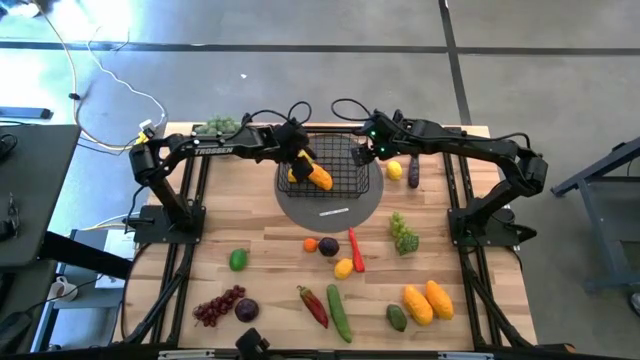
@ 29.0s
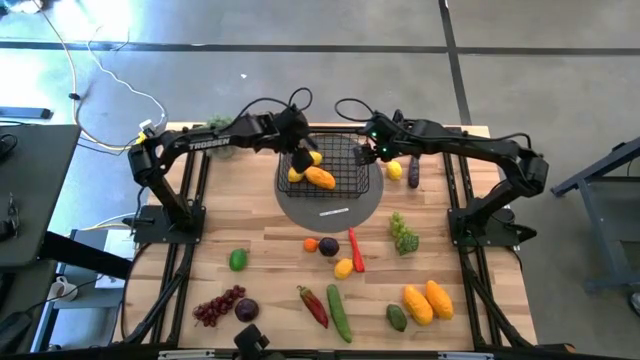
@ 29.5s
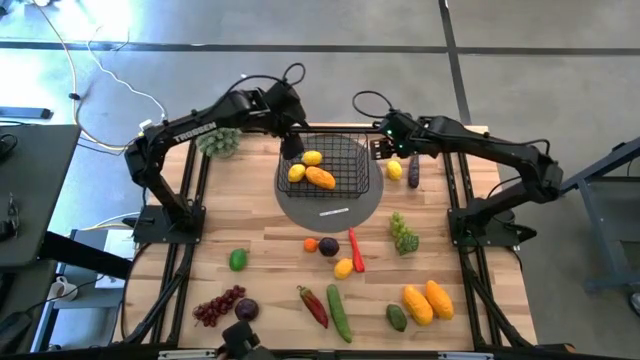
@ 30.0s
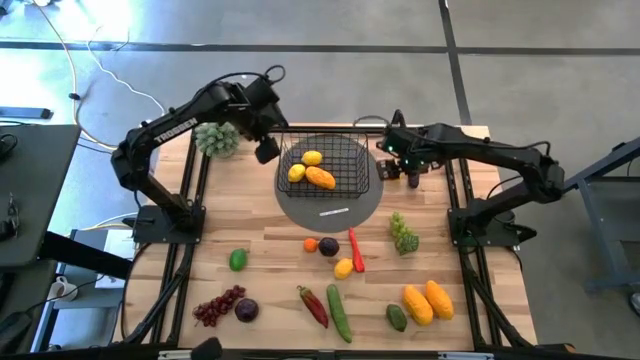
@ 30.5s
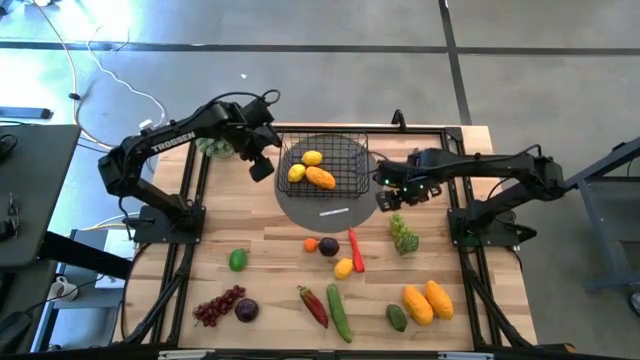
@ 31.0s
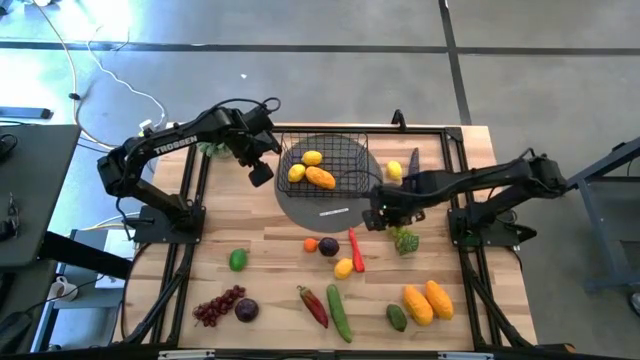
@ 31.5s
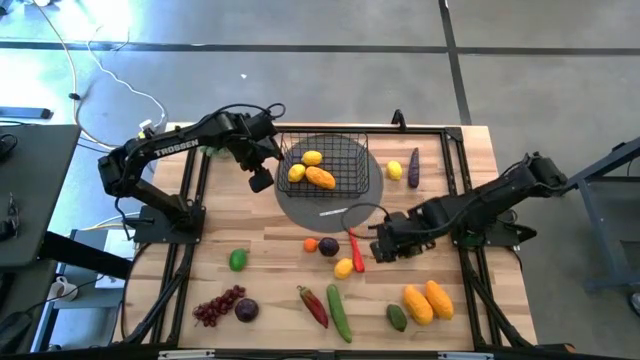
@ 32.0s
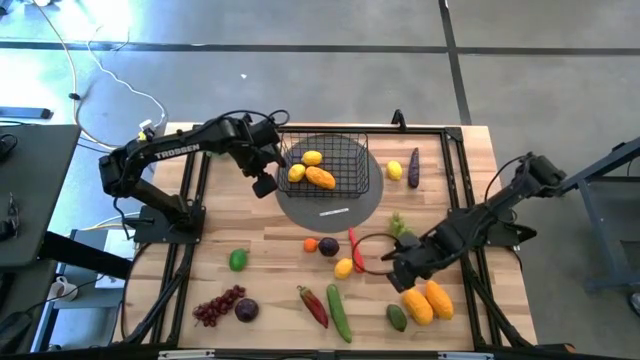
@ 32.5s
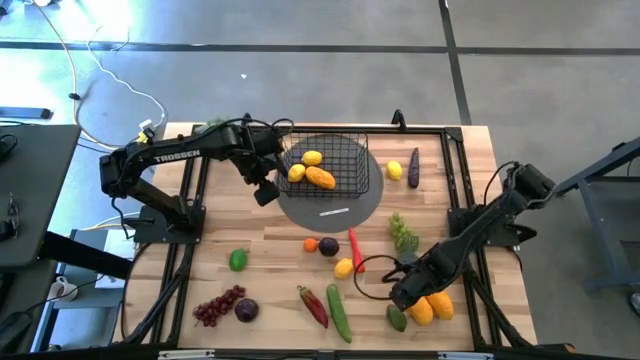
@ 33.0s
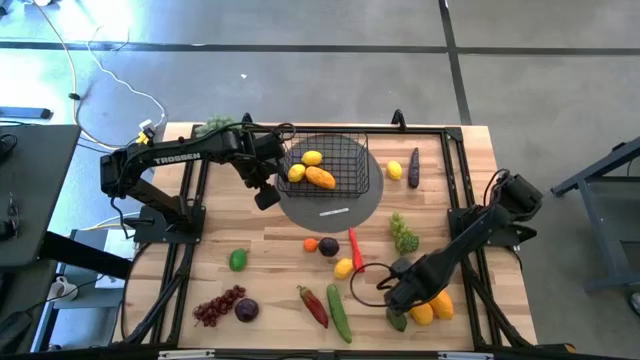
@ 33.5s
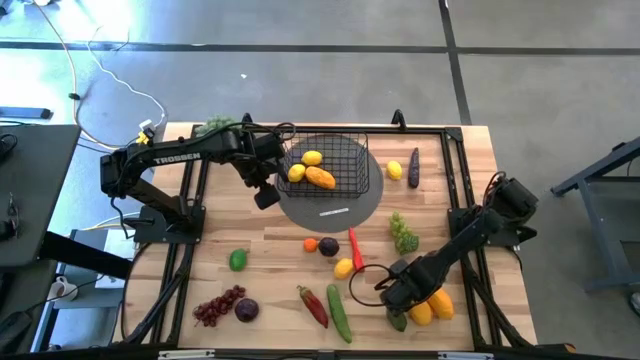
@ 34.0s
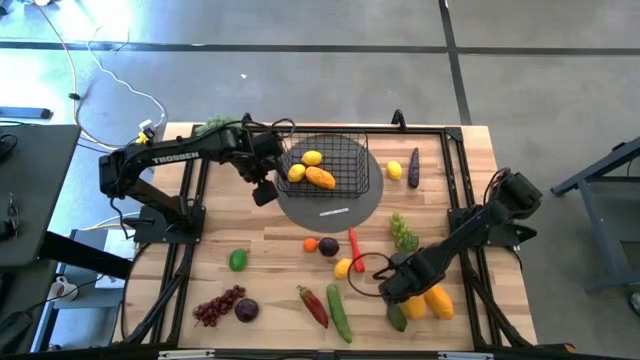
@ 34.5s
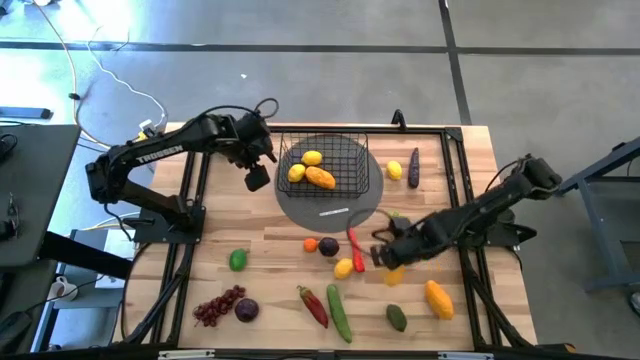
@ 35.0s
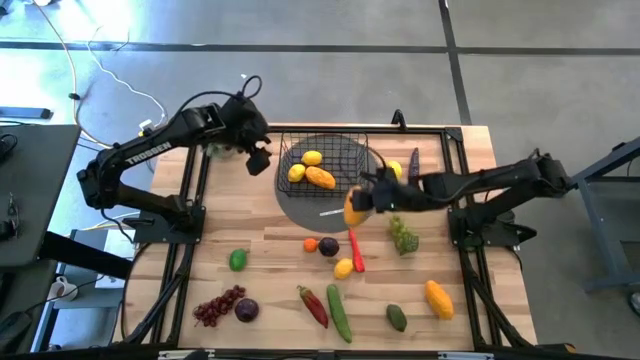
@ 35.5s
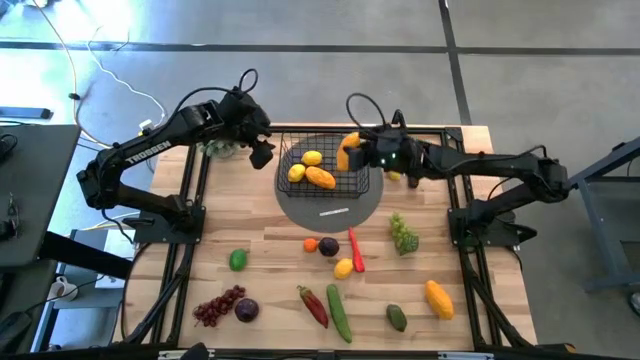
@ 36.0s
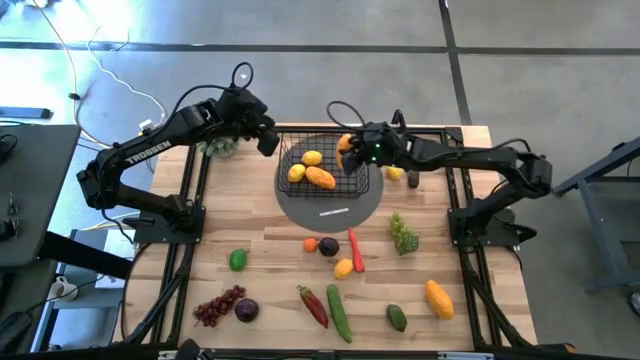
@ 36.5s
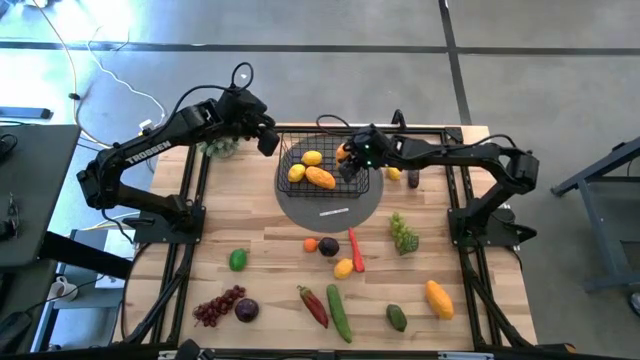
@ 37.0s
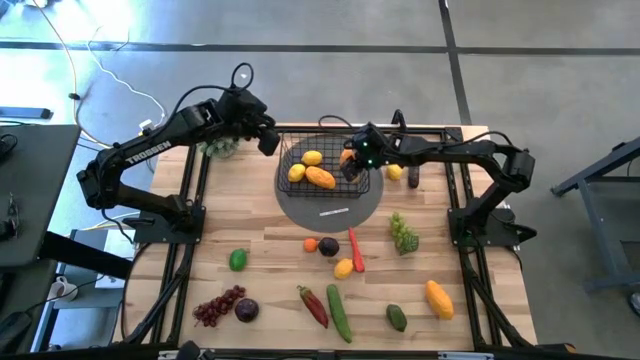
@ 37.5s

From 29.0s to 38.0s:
Task: Build produce basket
Put the mango into the black wire basket

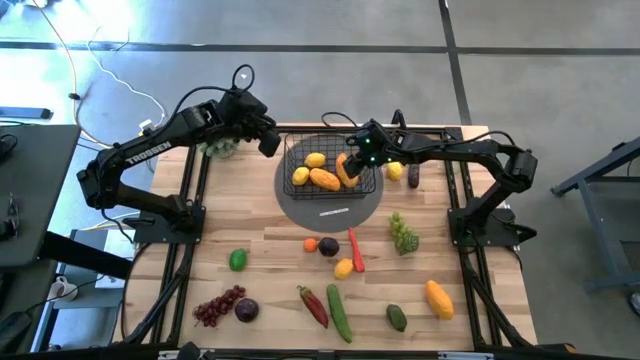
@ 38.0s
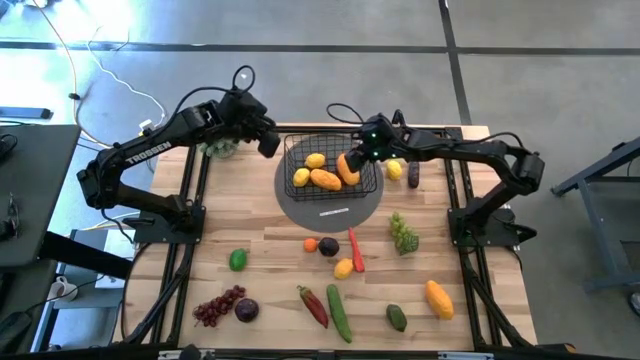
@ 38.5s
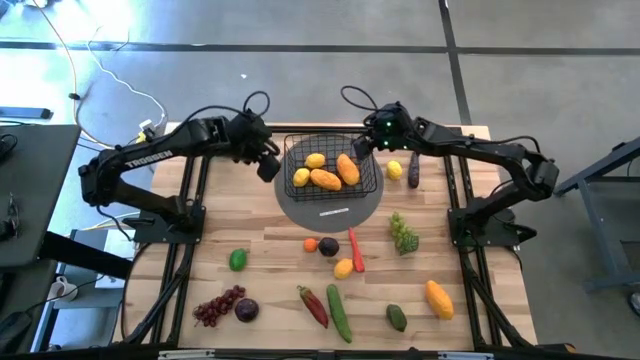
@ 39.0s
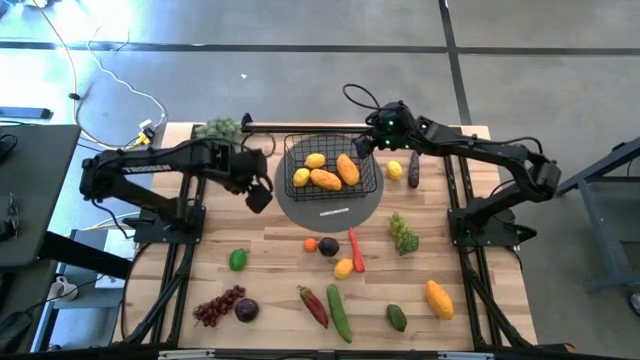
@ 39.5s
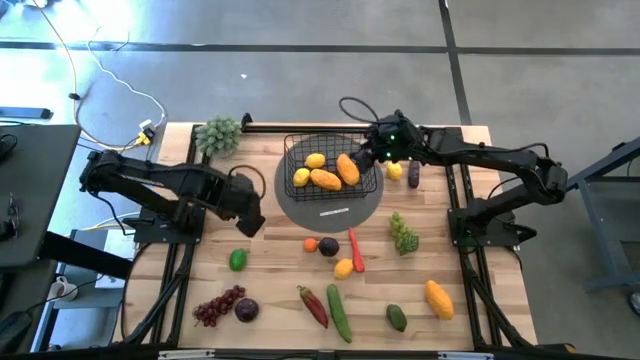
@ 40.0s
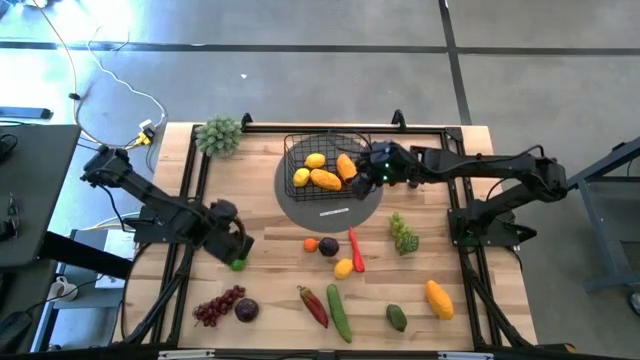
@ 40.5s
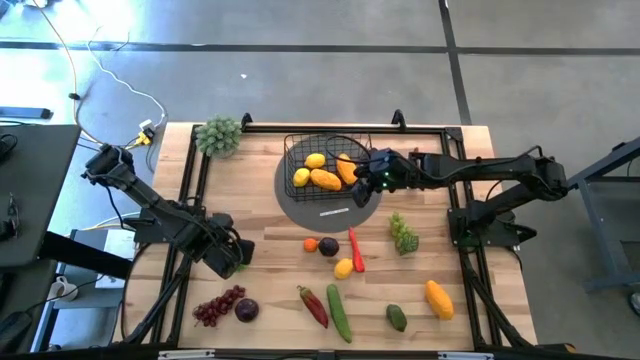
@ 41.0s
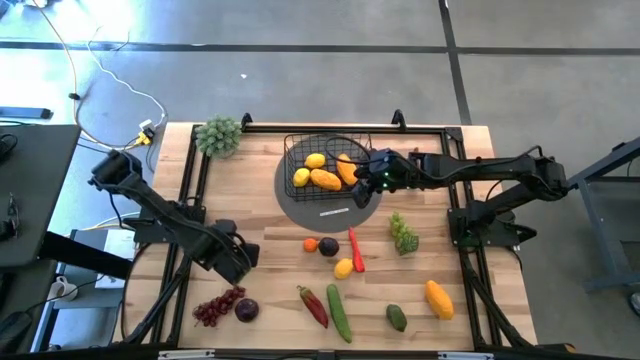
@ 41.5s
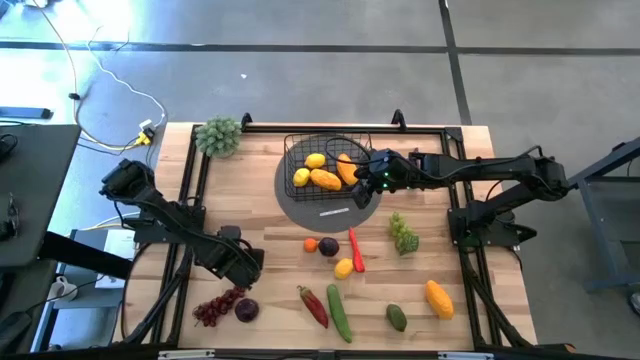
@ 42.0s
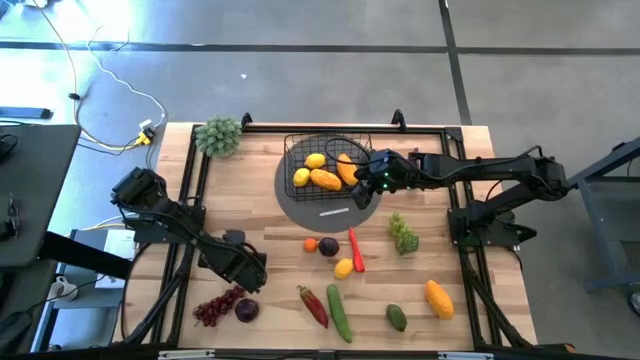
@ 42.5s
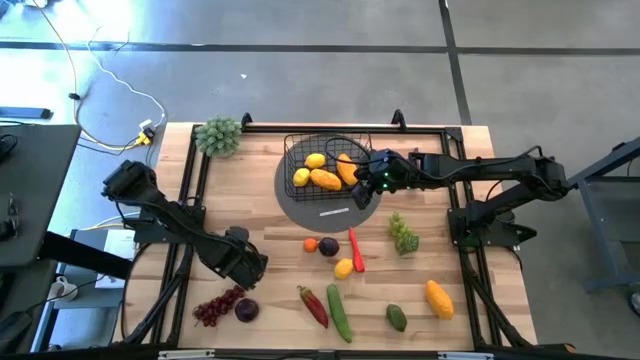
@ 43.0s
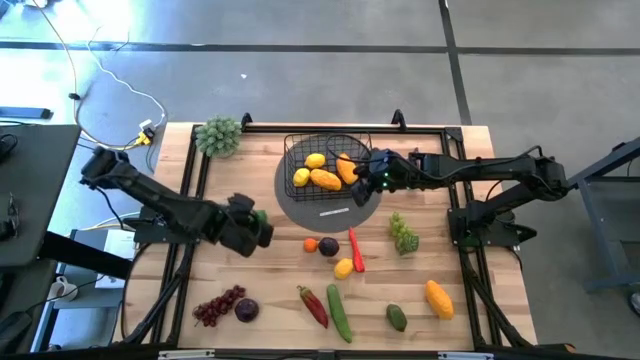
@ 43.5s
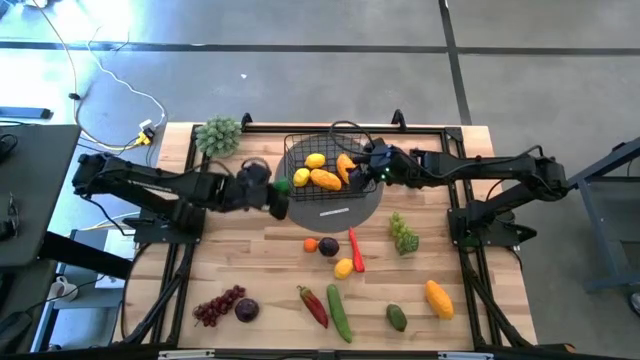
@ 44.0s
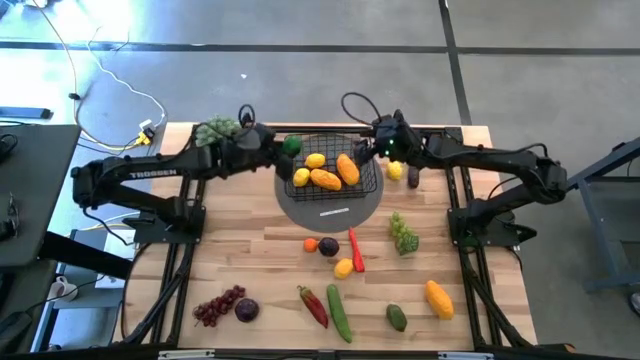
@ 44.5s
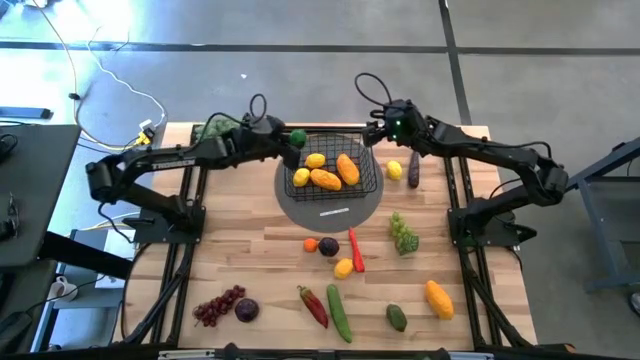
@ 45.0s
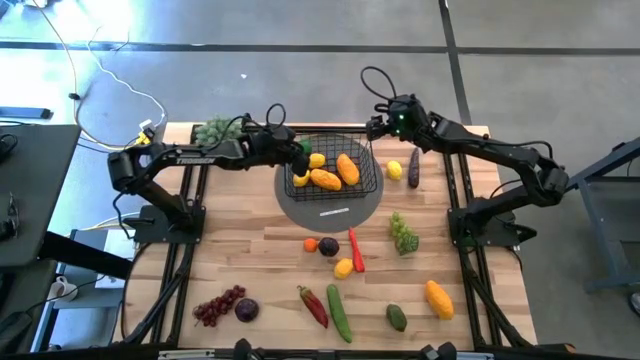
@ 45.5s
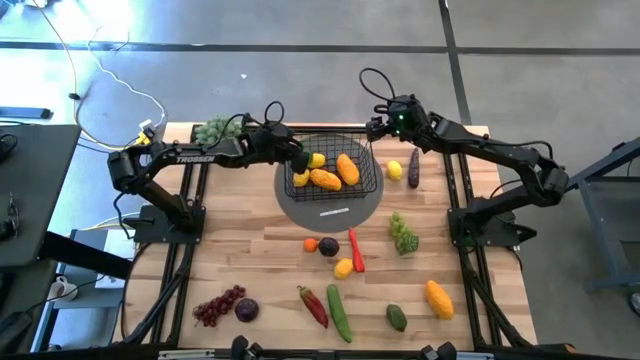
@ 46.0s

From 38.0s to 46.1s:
Put the lime into the black wire basket

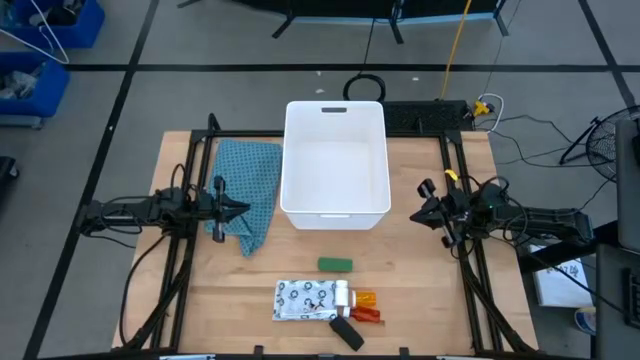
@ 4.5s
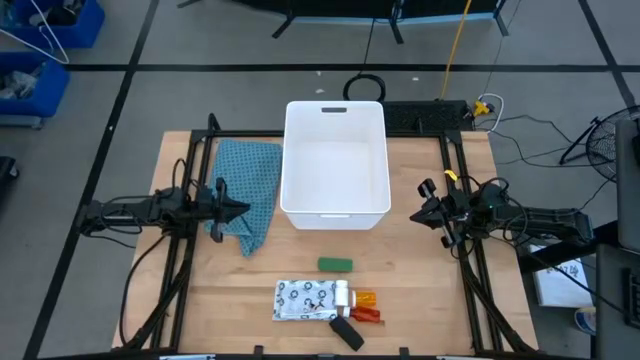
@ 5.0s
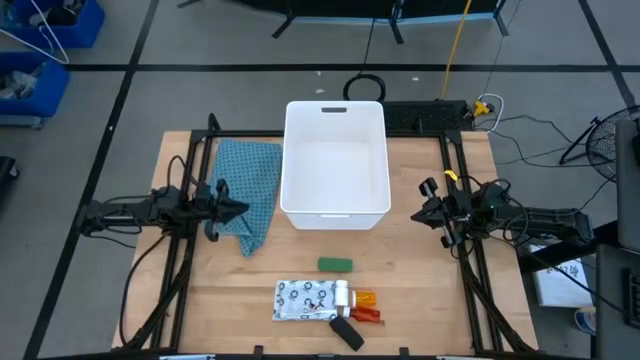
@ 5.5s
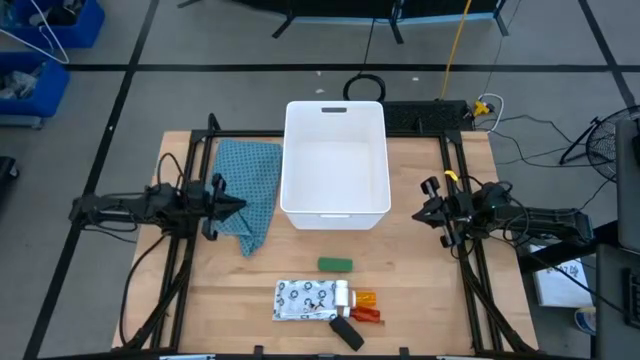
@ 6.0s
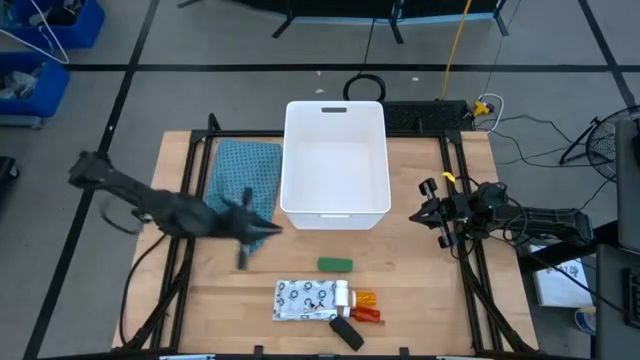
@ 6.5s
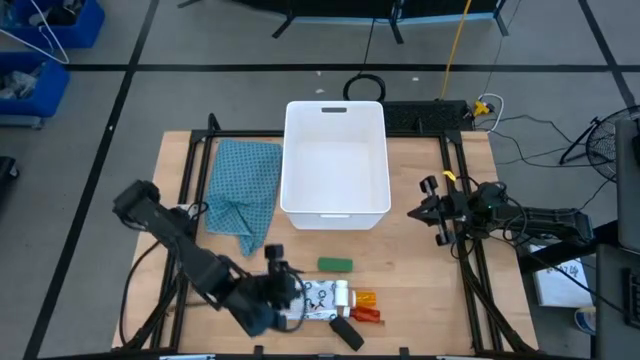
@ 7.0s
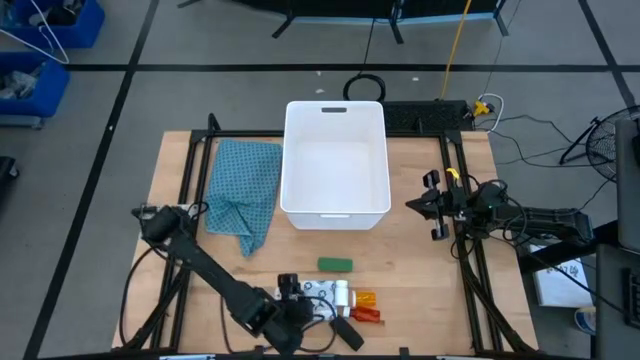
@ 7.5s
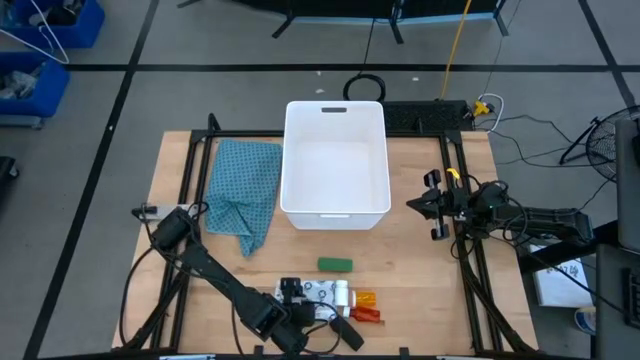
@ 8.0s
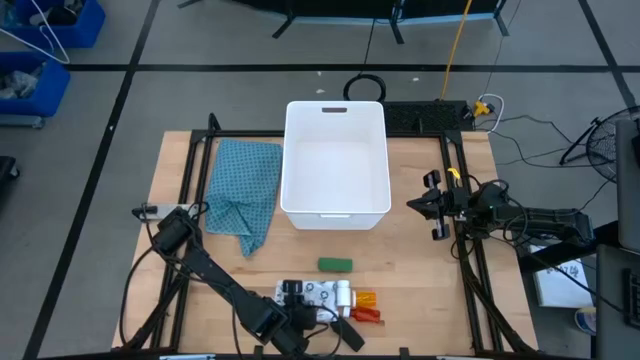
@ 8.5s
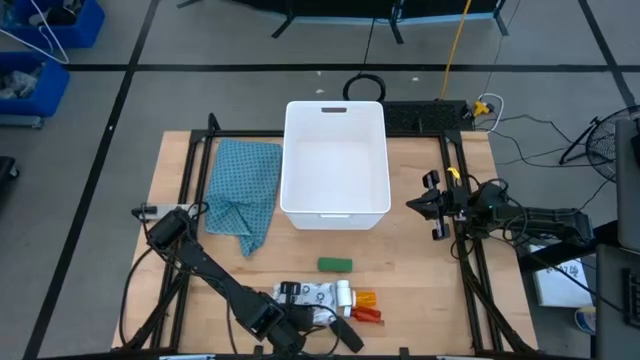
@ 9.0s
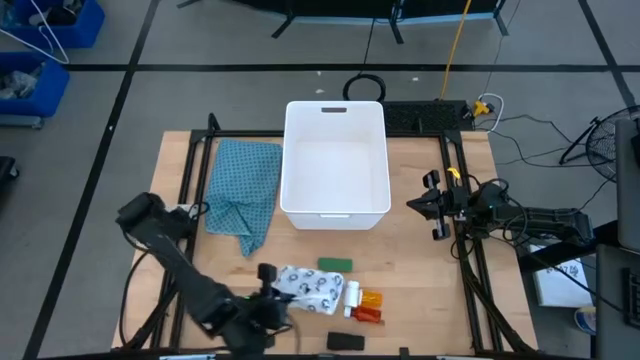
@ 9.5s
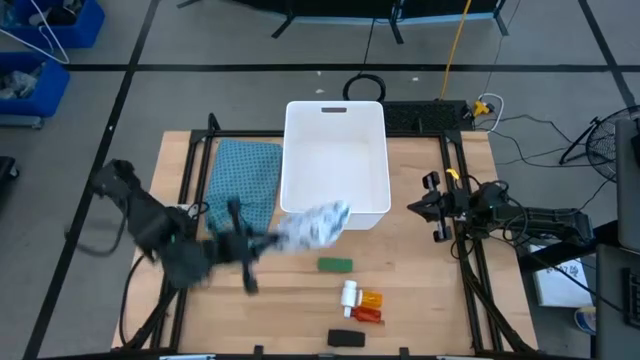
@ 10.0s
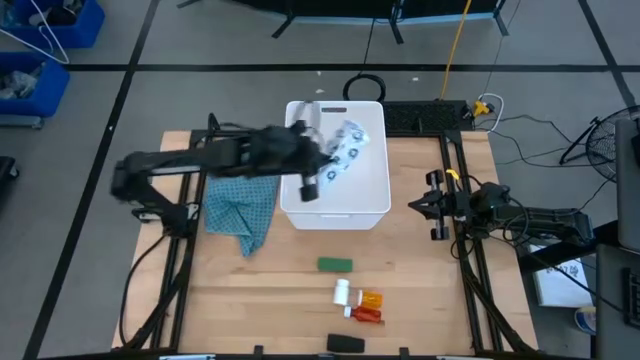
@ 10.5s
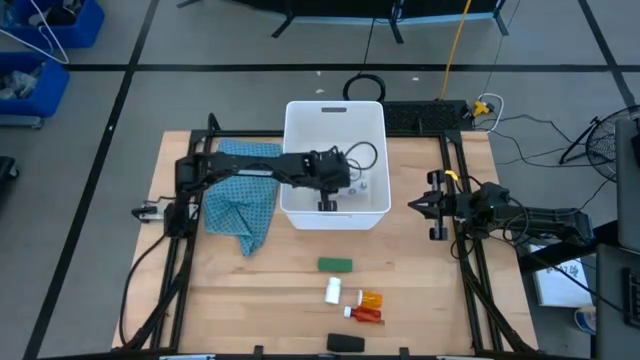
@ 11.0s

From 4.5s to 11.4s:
Task: Pick & place medical supplies in basket/bin
Put the white mailer bag into the white bin
